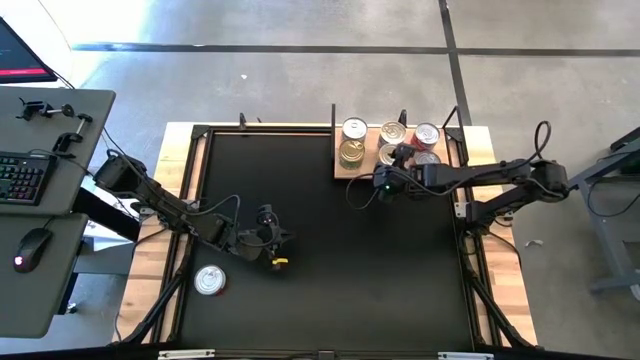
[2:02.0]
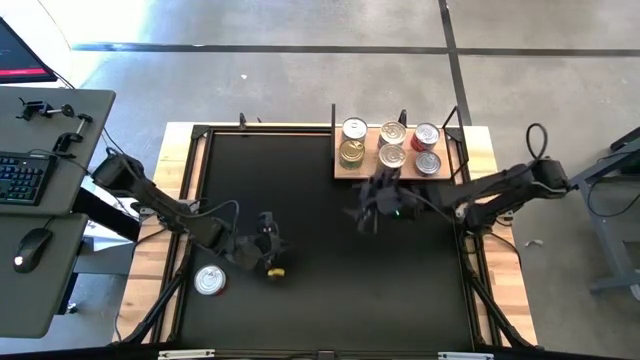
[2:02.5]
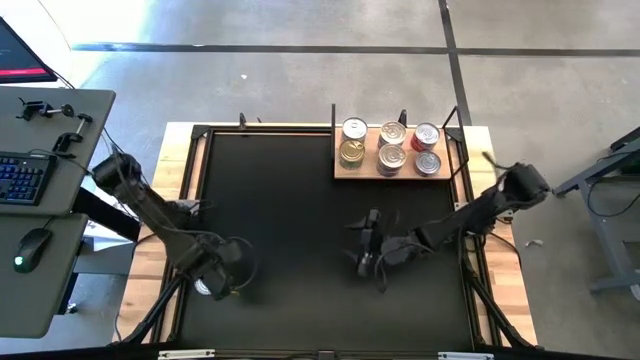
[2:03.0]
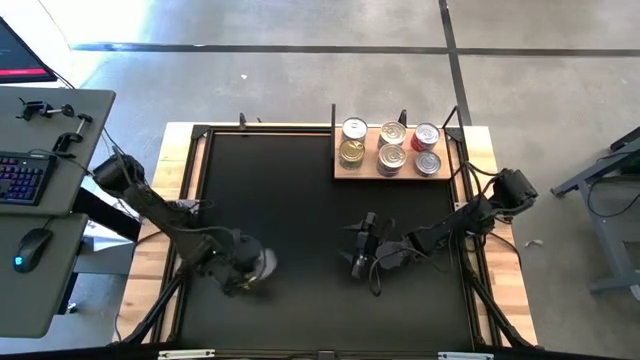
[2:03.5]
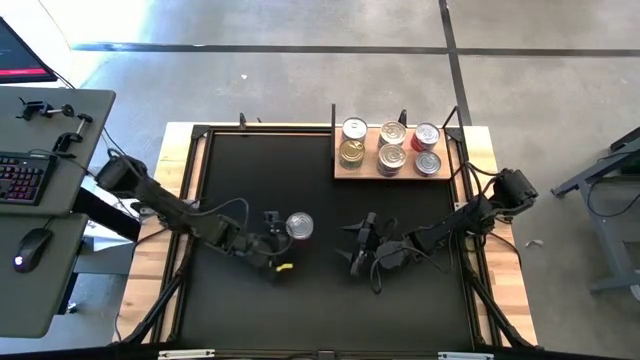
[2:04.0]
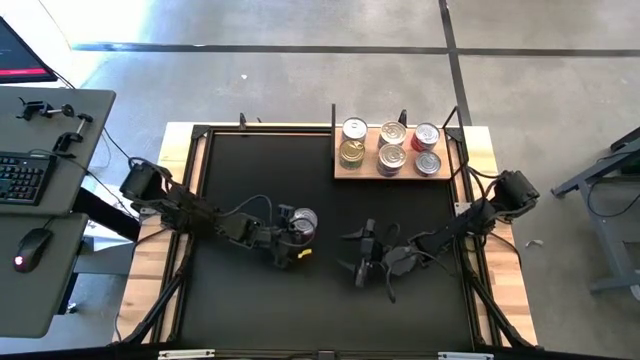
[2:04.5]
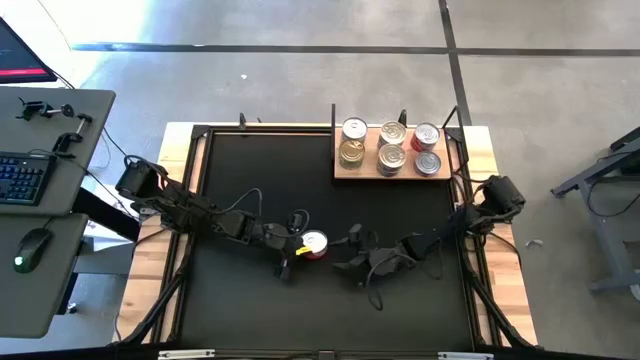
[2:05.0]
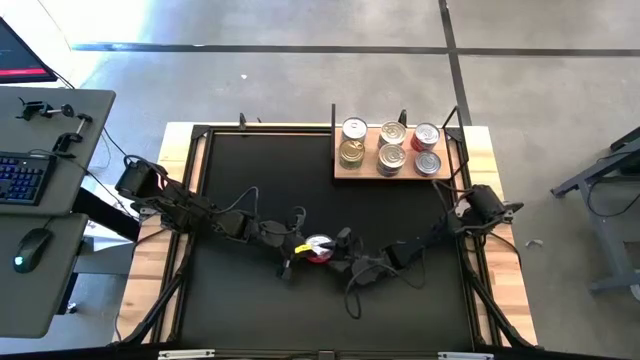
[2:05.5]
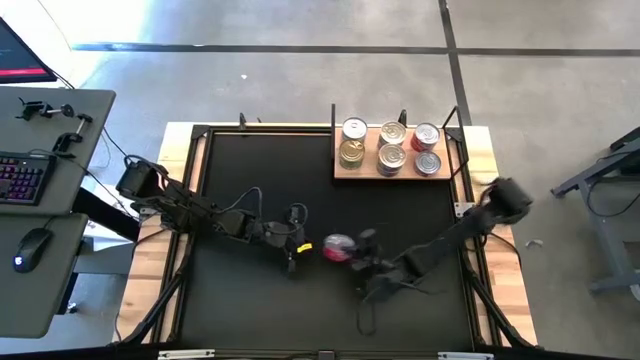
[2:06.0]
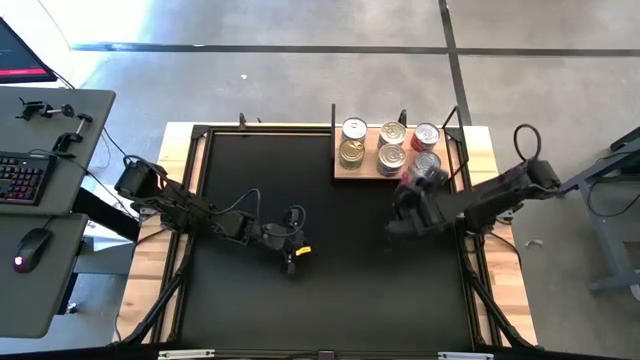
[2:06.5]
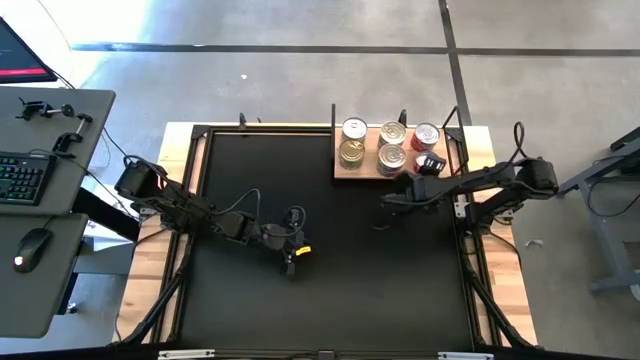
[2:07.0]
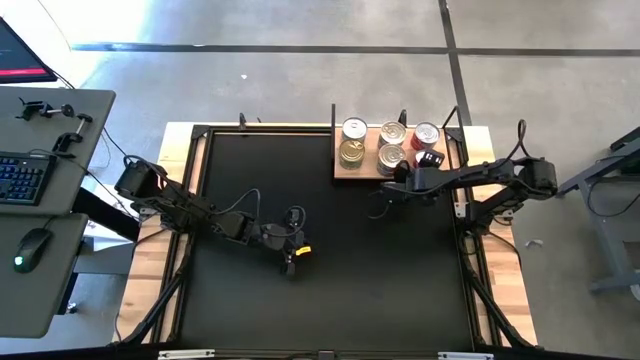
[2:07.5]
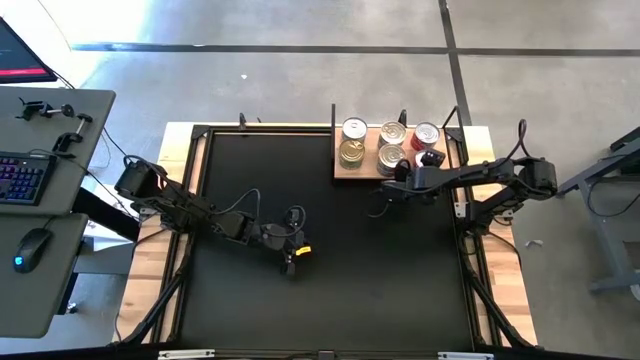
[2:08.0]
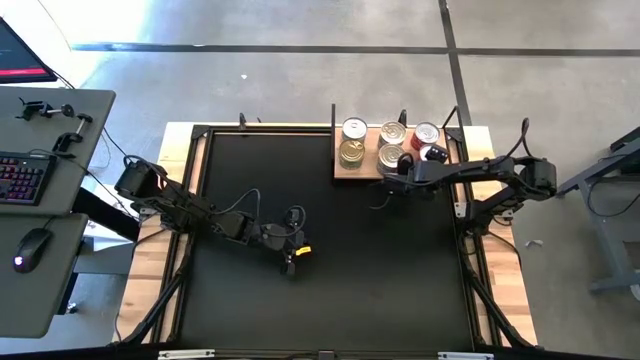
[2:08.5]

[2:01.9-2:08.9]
Task: Stack canned seafood by type on shelf
Stack the red tuna can on top of the other red tuna can on the shelf

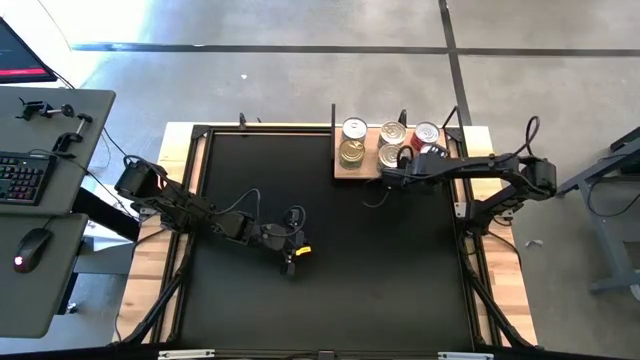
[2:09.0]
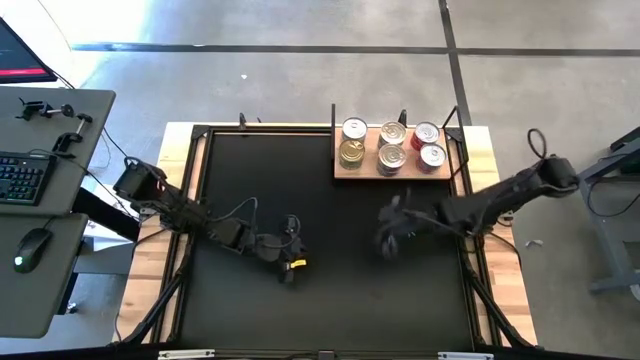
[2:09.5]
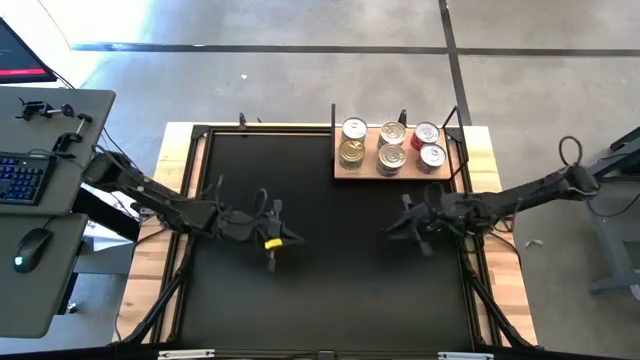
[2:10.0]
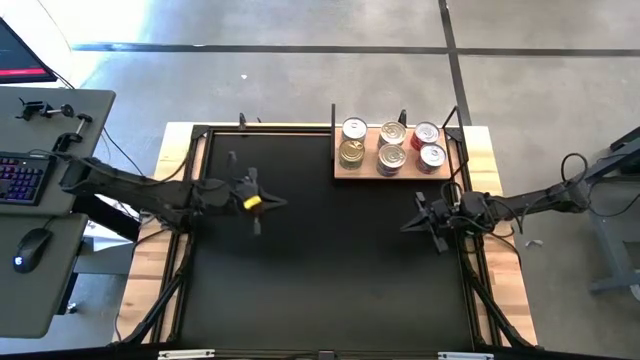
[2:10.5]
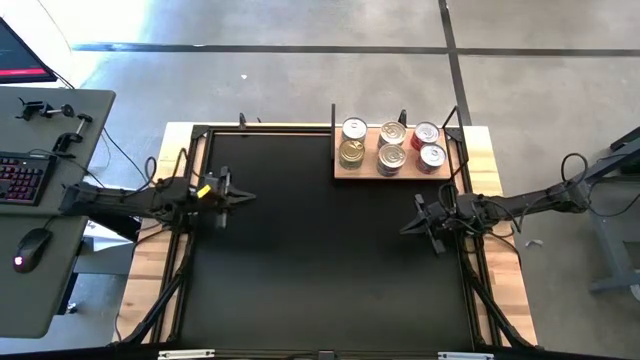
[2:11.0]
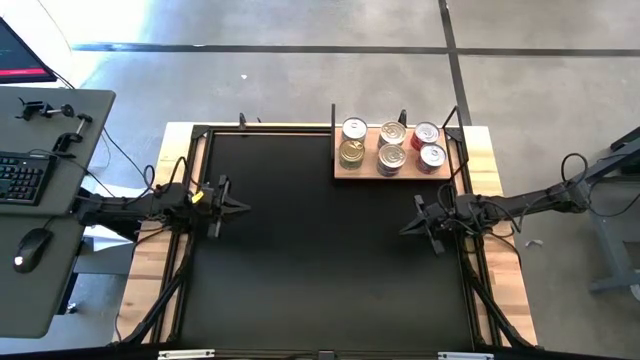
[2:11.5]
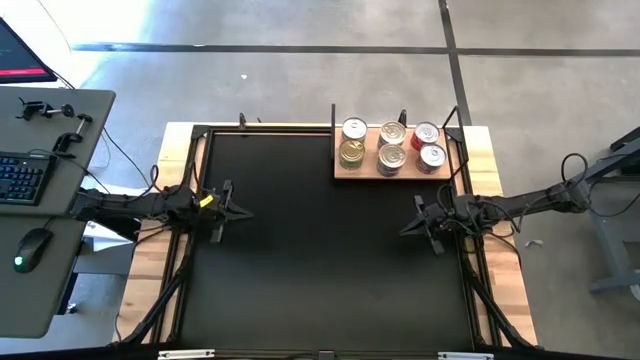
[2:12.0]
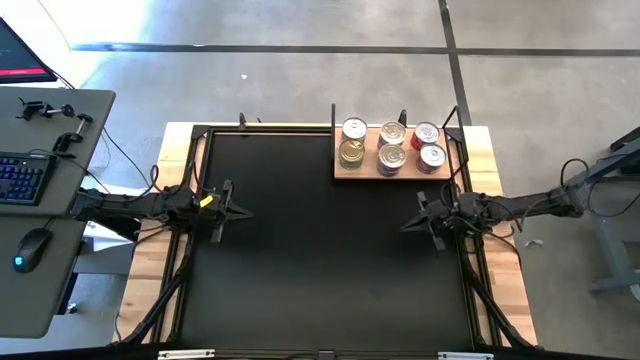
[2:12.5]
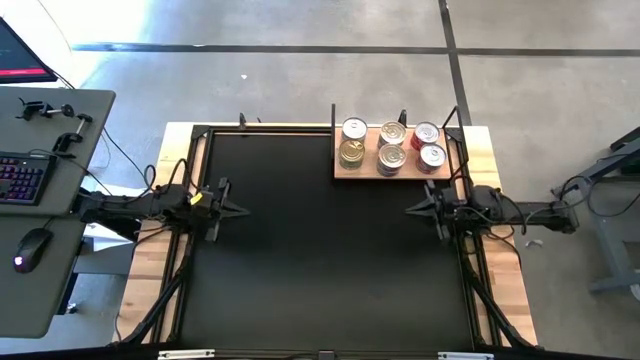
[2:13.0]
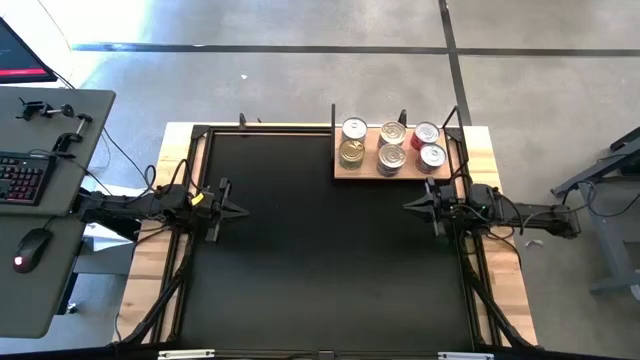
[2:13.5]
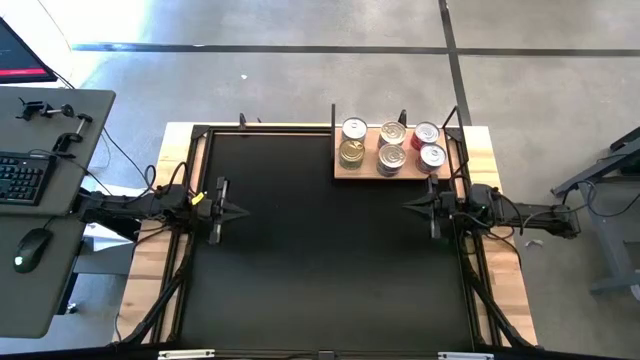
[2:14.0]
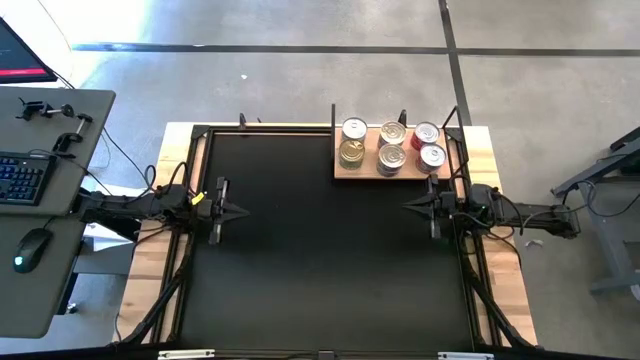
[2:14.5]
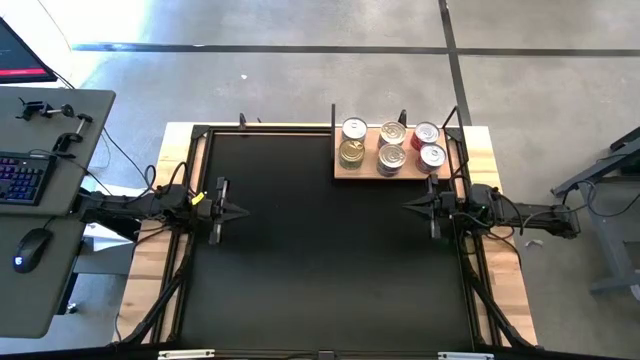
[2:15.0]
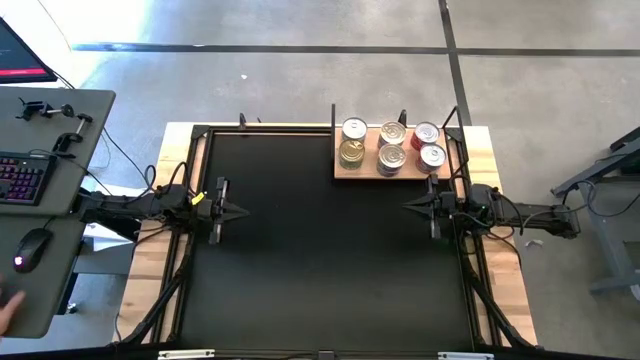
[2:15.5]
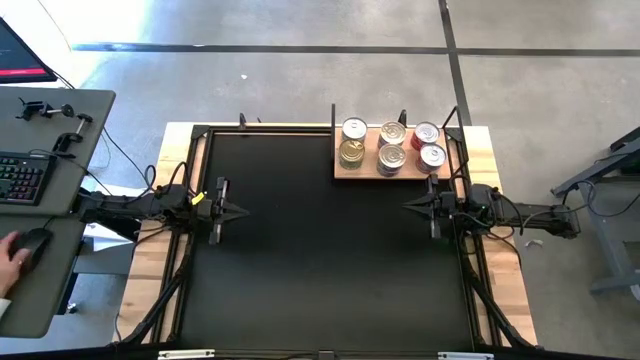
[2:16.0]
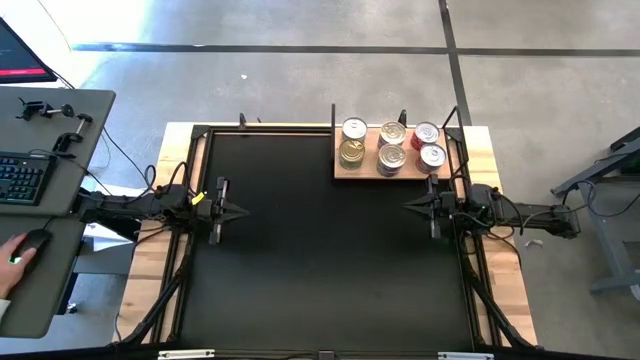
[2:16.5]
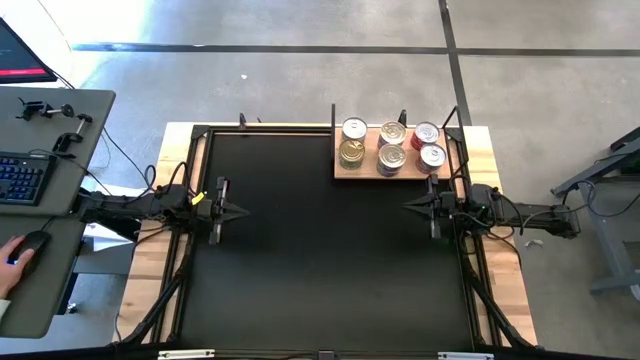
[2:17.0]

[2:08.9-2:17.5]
Return to Home Position

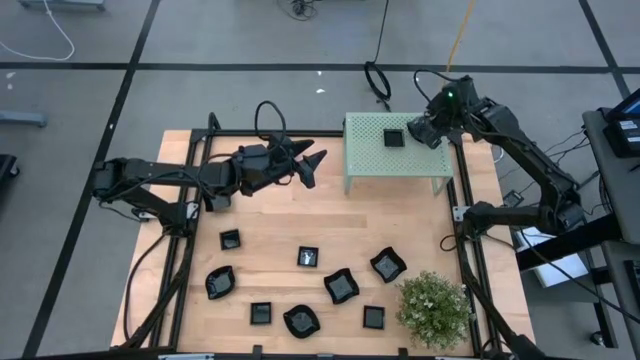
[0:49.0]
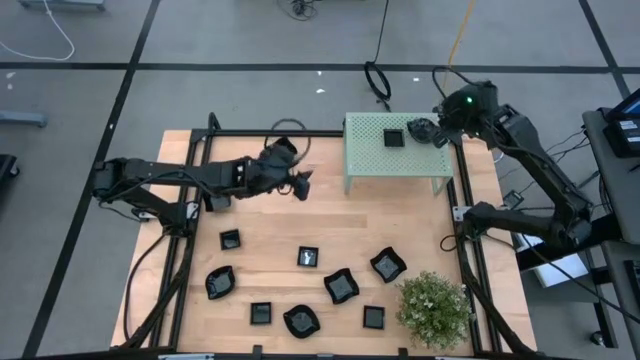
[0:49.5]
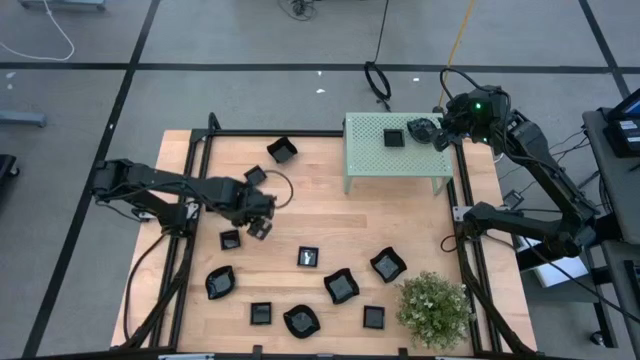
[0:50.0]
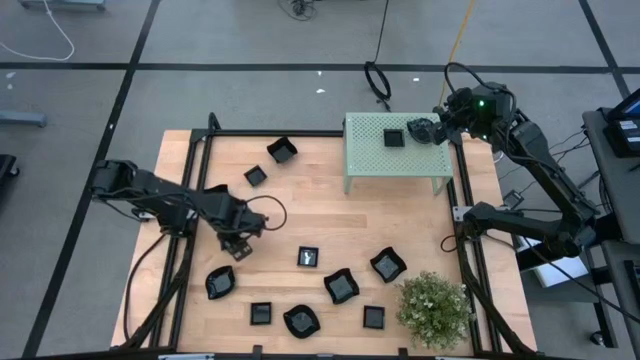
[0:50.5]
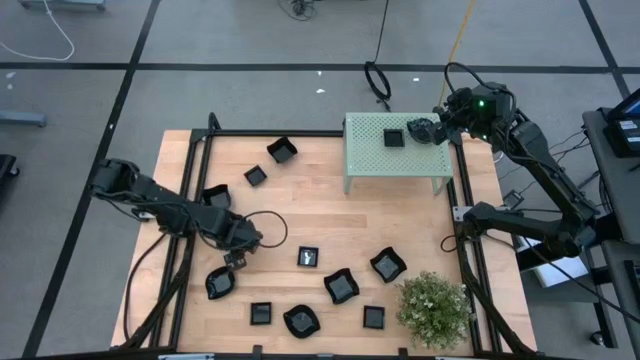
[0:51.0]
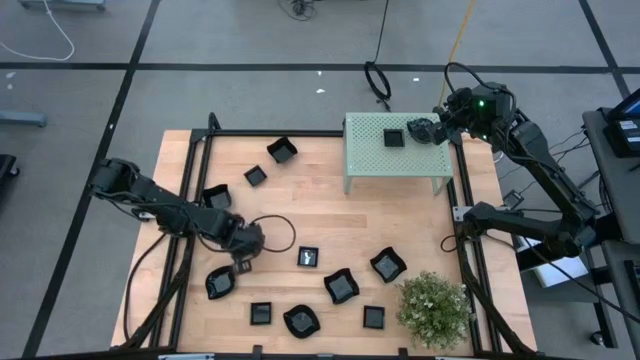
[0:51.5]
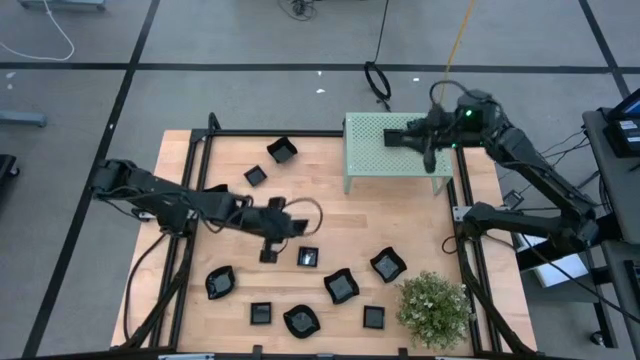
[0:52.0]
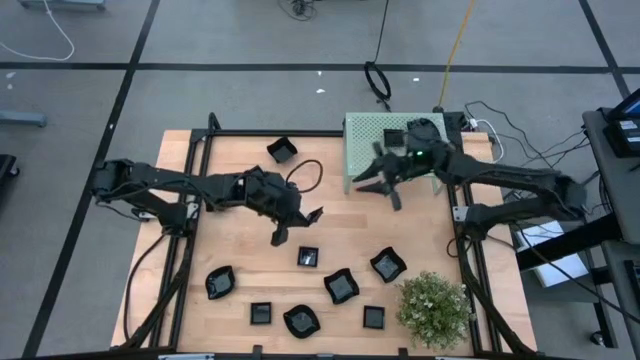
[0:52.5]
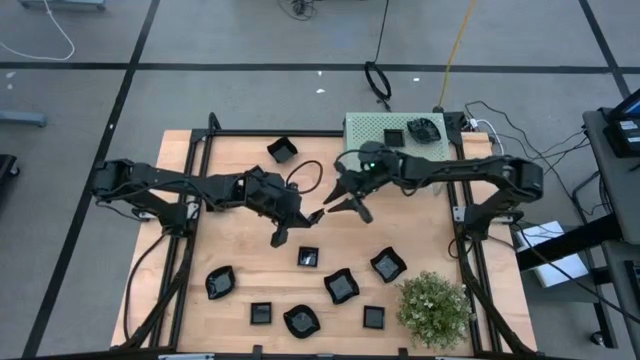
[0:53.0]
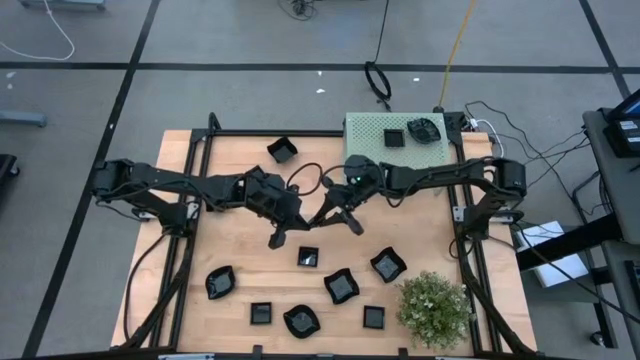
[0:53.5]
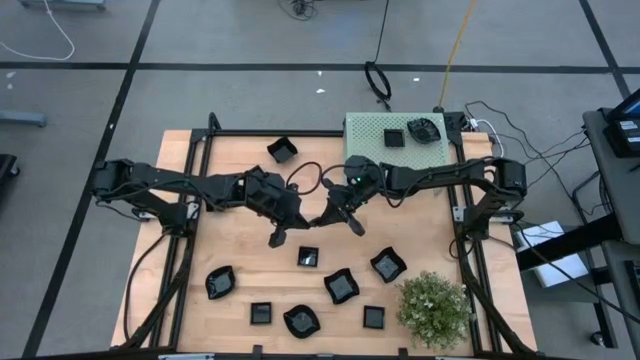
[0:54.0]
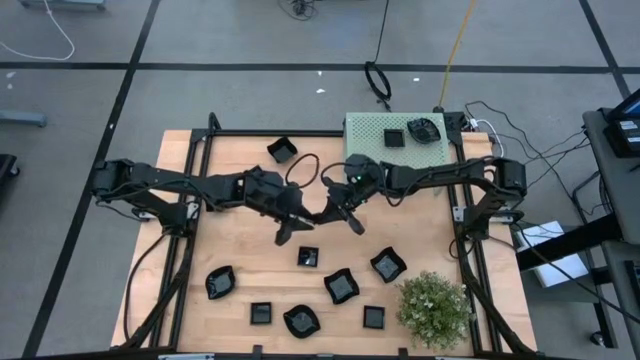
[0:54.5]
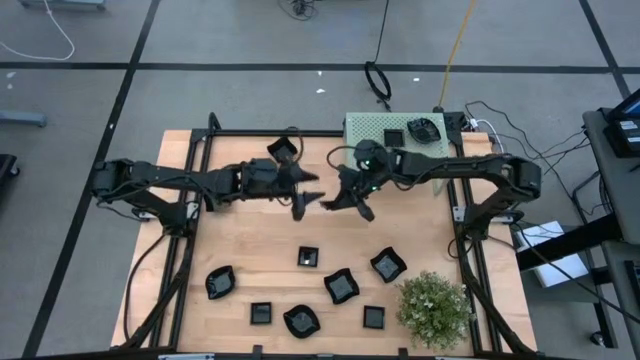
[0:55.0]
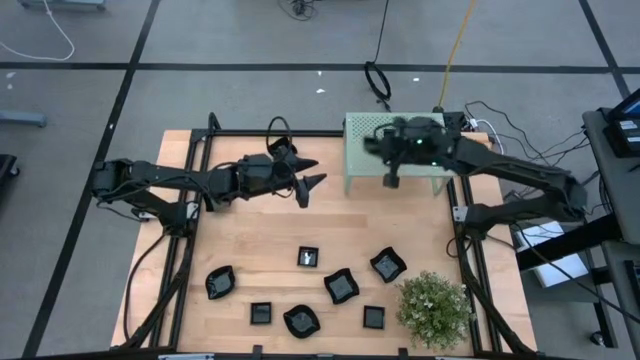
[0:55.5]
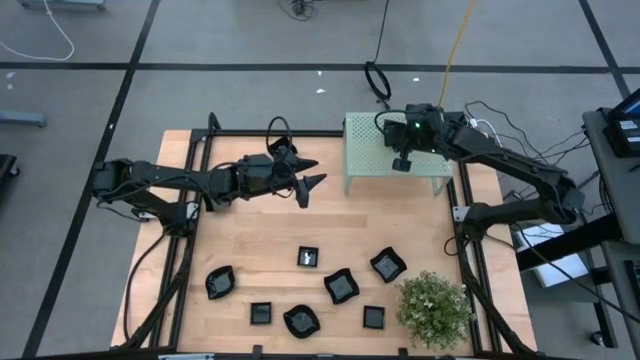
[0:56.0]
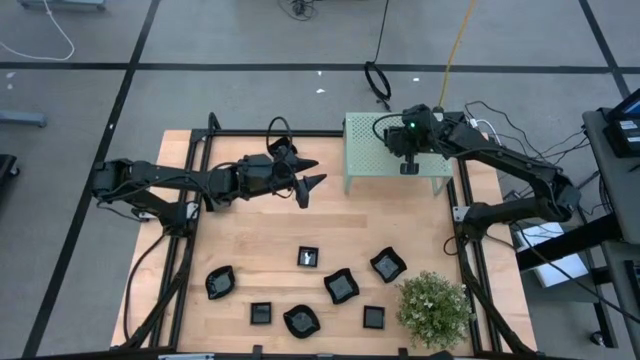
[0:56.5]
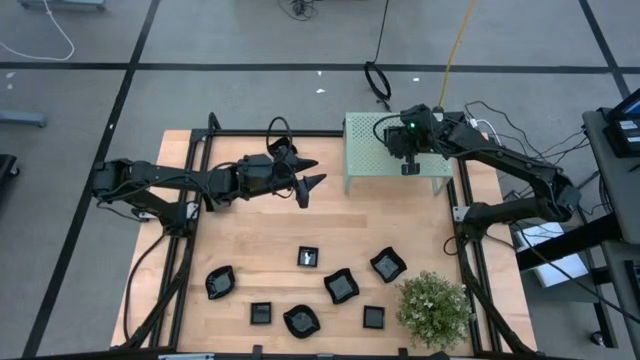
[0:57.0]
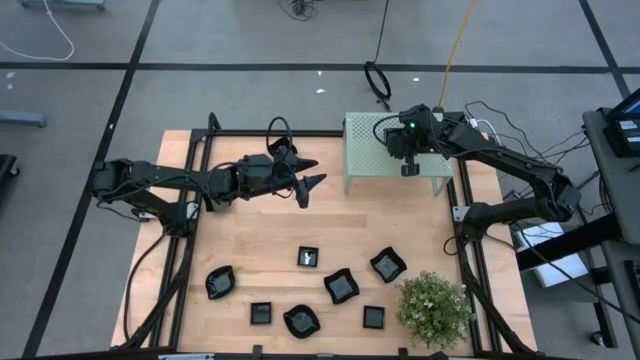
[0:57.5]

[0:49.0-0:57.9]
Task: Pick & Place Mini shaped plates
Stack the black square plate on top of the square plate on the shelf
